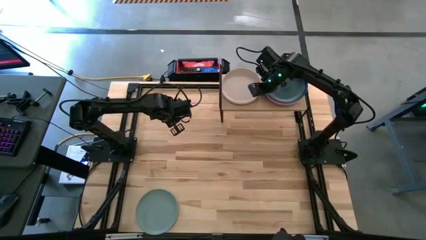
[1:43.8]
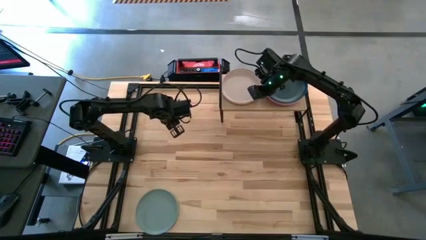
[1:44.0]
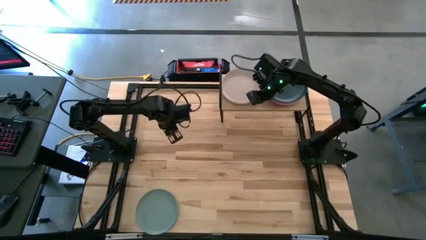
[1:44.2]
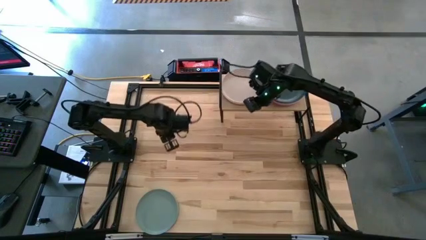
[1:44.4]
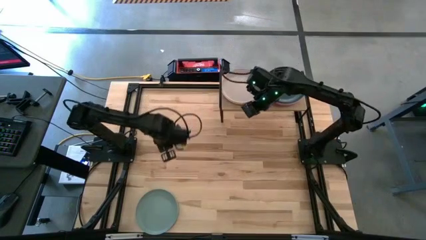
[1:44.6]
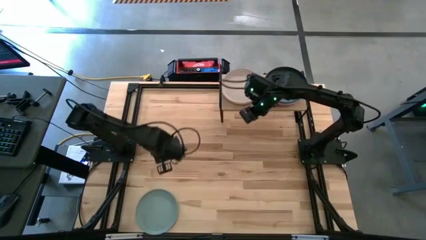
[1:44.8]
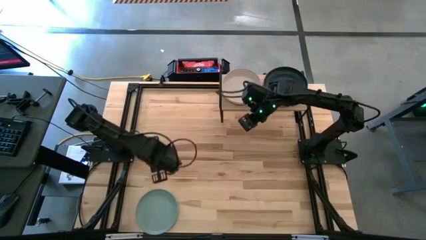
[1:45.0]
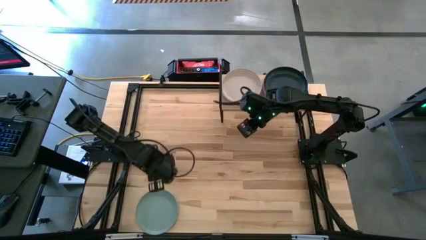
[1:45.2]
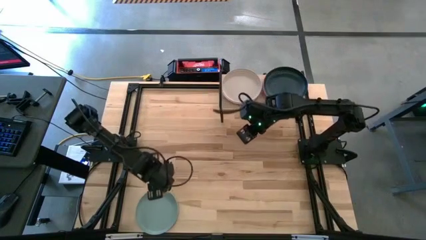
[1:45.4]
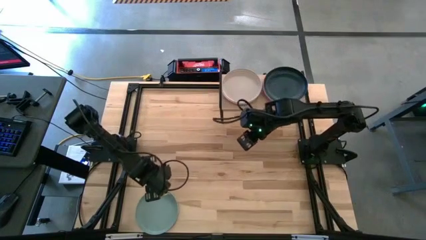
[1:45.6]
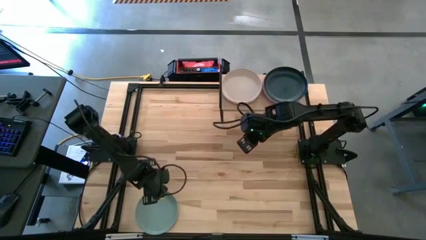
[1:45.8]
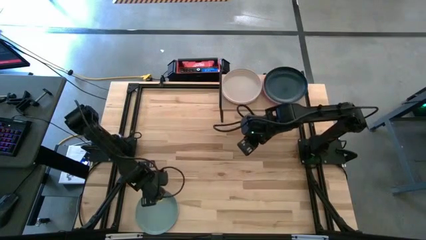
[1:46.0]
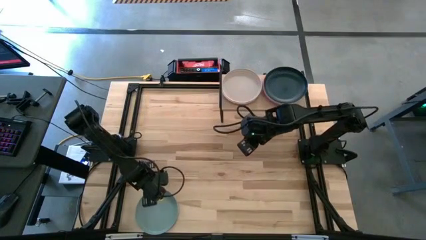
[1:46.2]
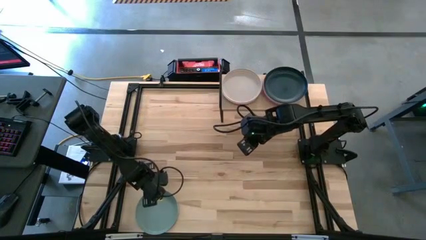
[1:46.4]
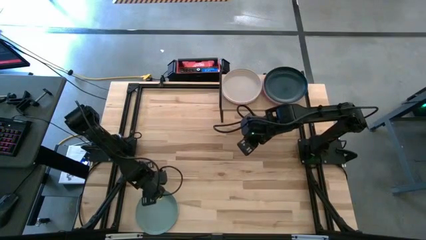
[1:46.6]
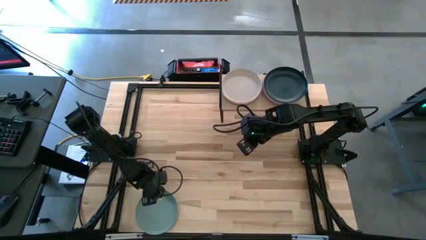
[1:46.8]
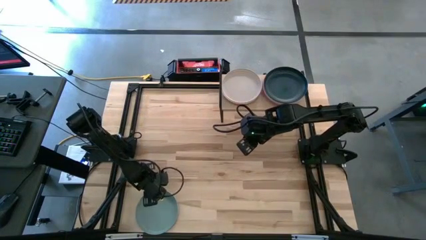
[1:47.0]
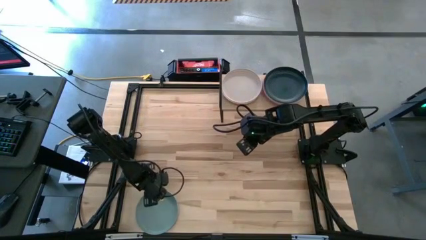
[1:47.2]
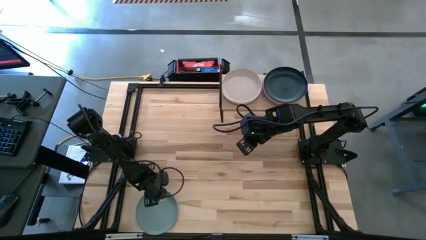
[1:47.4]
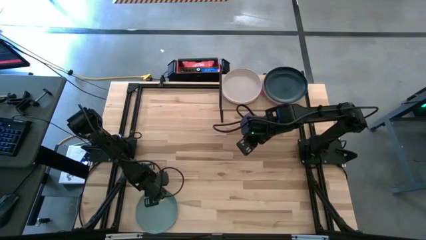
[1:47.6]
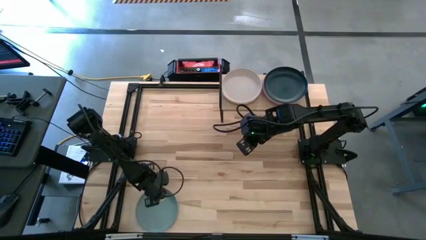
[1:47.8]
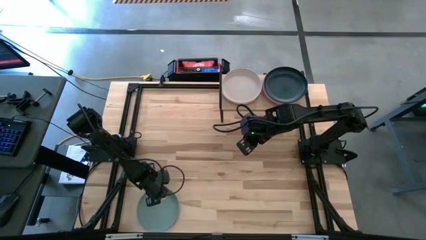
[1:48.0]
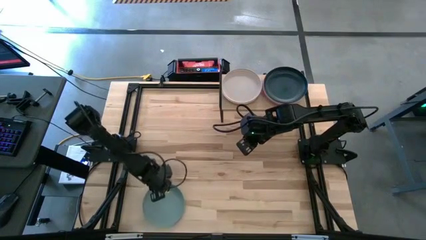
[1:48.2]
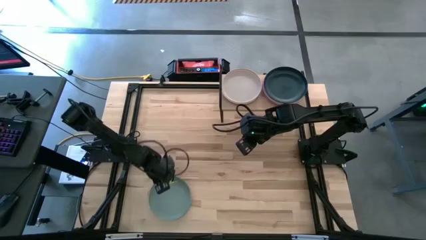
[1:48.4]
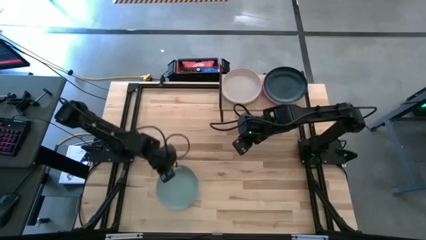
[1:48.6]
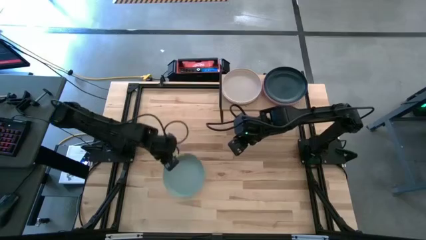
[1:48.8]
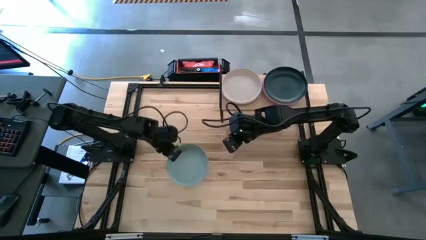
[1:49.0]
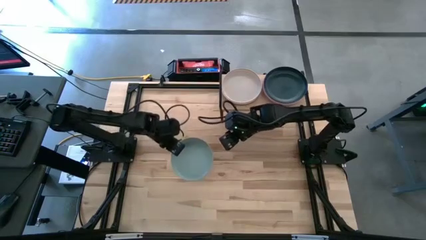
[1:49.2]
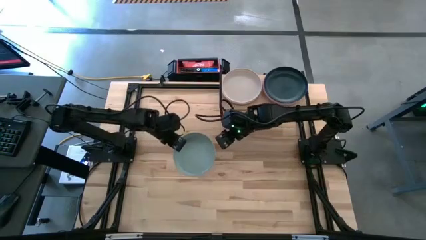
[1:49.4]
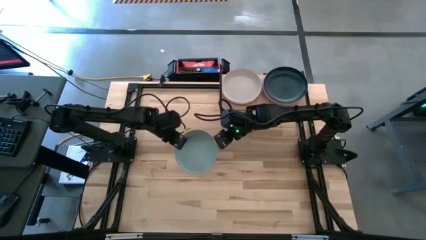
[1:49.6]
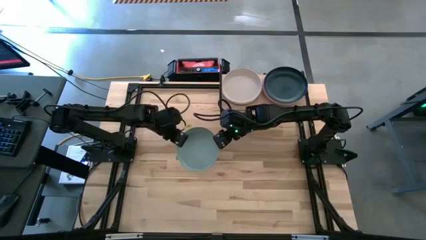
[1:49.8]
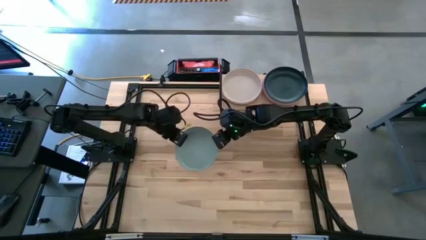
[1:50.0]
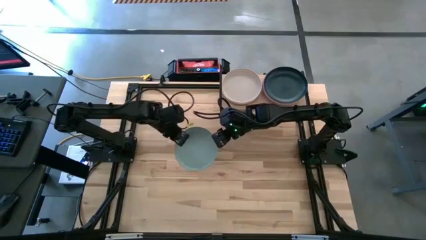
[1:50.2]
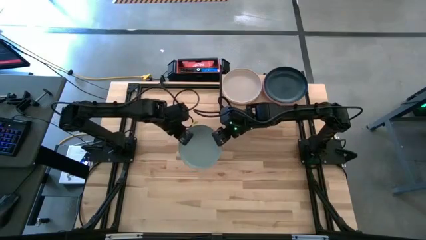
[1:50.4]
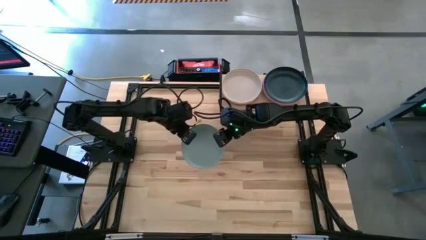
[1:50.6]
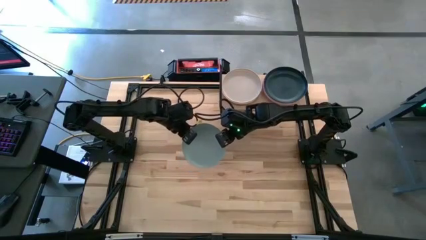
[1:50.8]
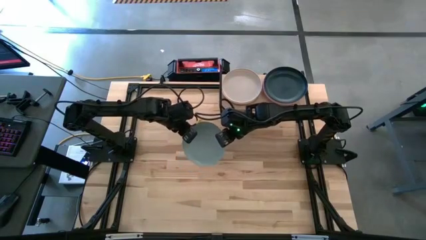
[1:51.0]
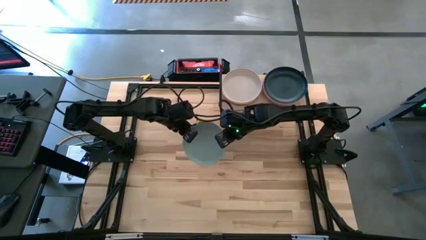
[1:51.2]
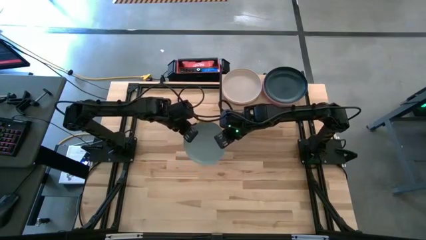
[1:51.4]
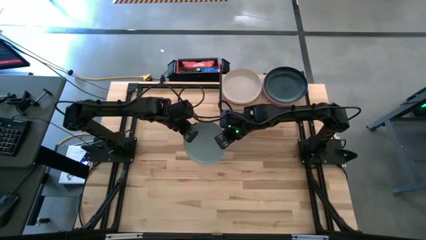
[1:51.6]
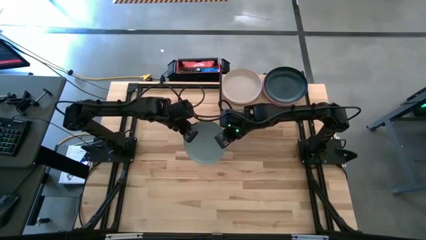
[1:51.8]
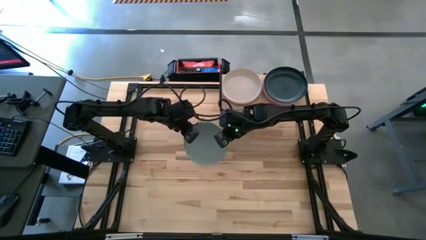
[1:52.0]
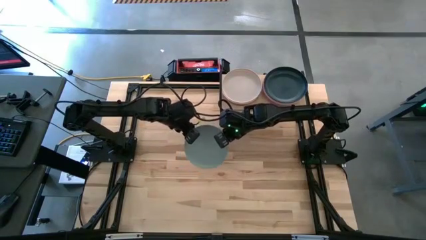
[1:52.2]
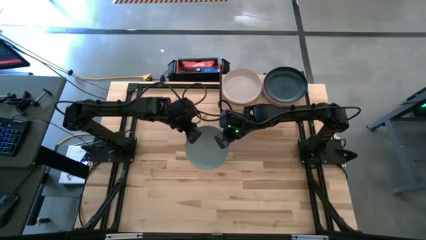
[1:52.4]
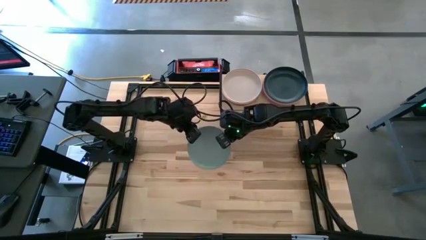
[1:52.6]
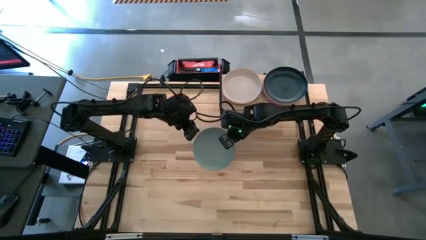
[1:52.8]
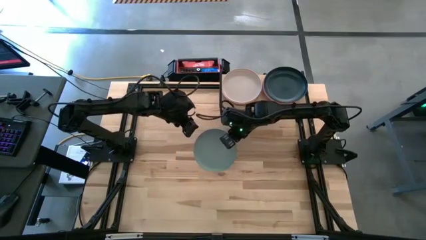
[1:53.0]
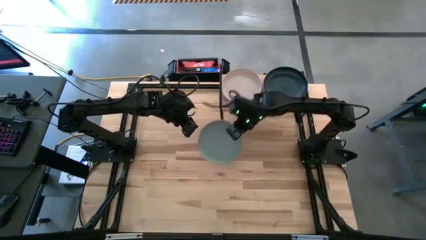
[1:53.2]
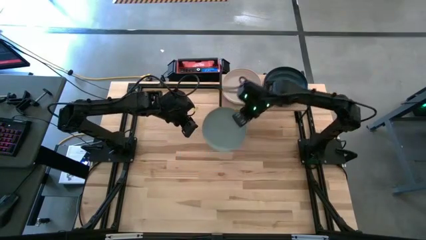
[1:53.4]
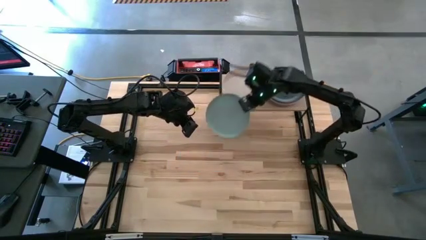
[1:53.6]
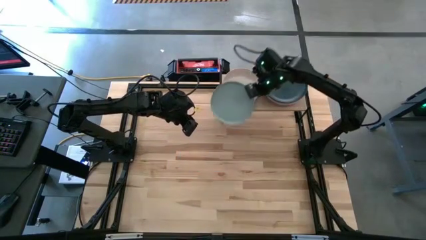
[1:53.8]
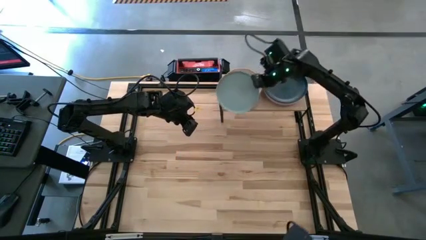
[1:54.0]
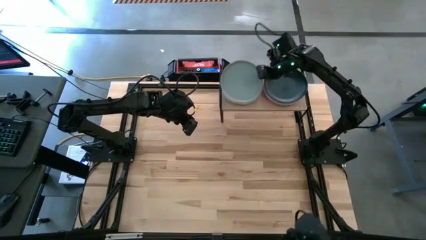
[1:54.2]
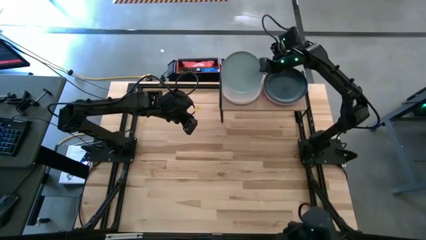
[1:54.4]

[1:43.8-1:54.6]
Task: Place and stack plates onto a shelf
Stack the light blue plate on top of the gray plate on the shelf

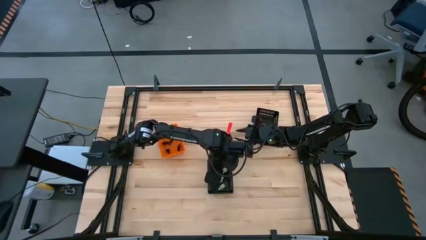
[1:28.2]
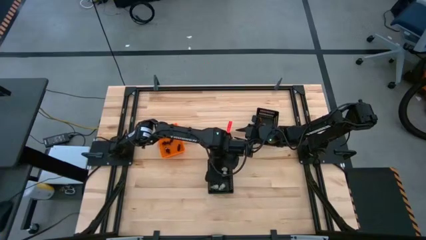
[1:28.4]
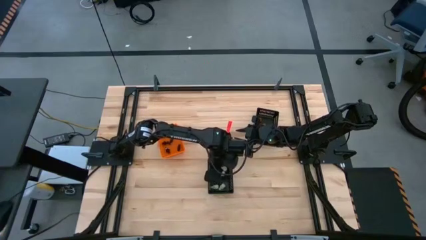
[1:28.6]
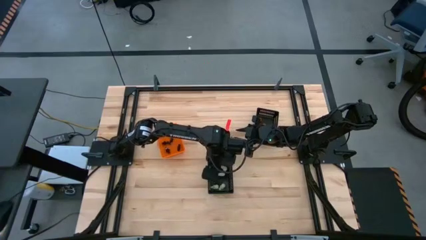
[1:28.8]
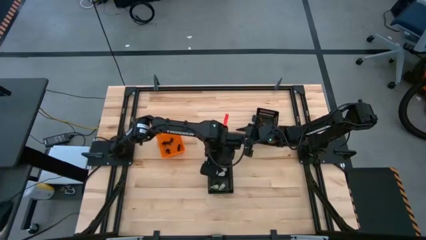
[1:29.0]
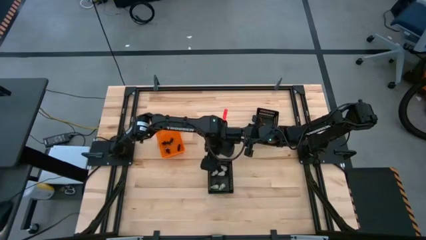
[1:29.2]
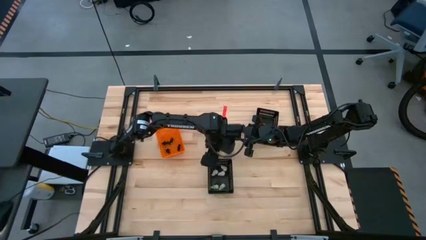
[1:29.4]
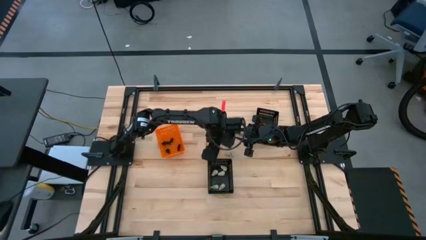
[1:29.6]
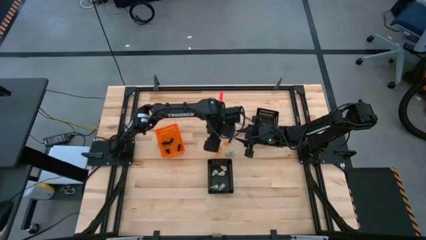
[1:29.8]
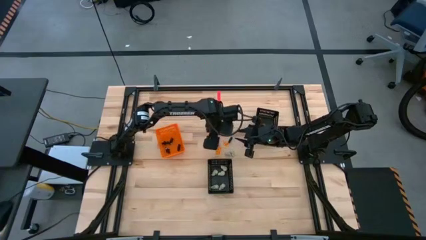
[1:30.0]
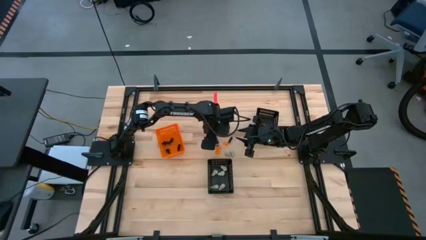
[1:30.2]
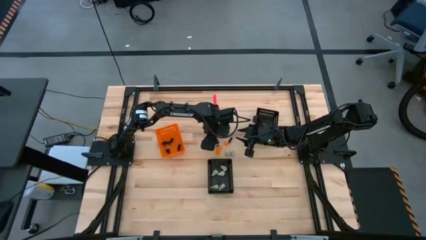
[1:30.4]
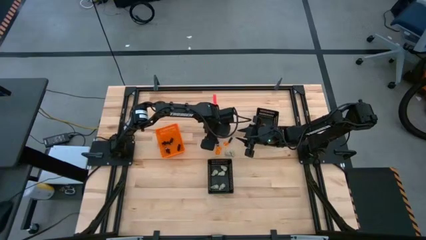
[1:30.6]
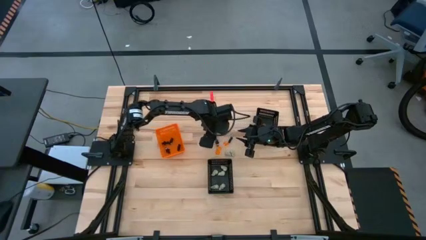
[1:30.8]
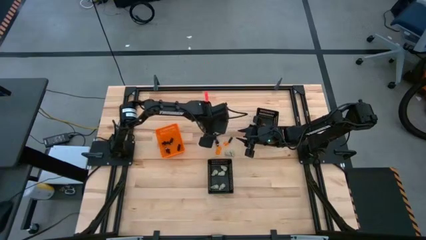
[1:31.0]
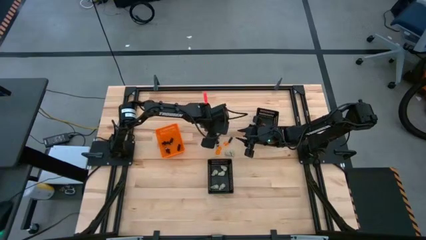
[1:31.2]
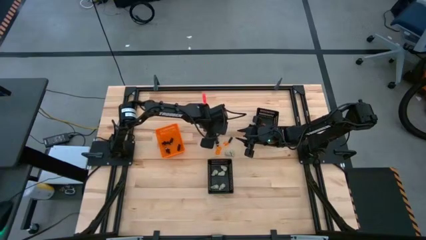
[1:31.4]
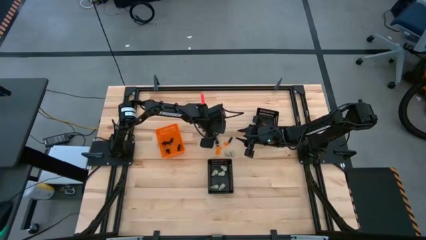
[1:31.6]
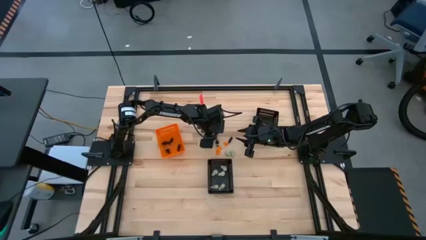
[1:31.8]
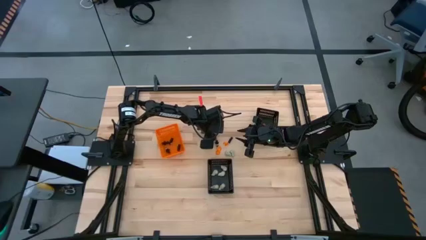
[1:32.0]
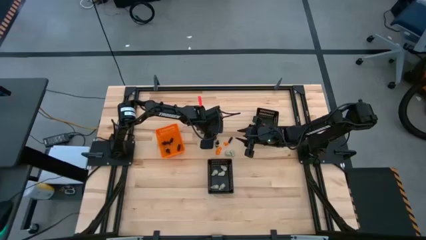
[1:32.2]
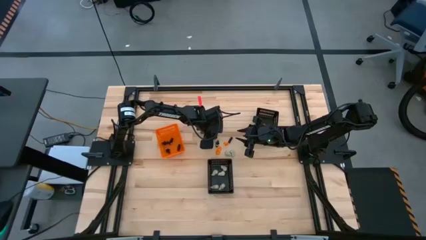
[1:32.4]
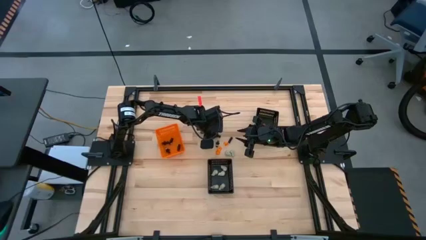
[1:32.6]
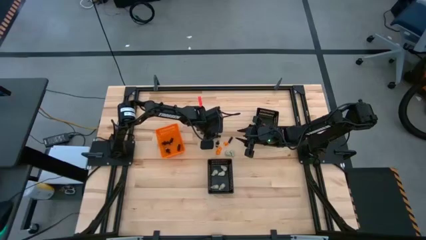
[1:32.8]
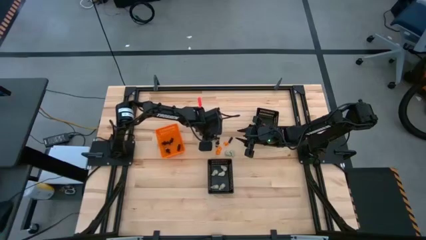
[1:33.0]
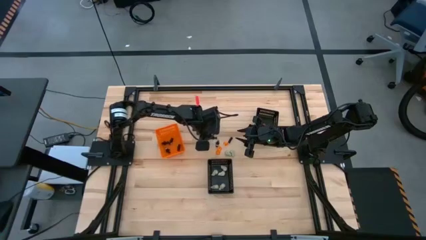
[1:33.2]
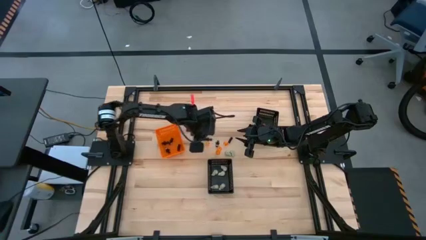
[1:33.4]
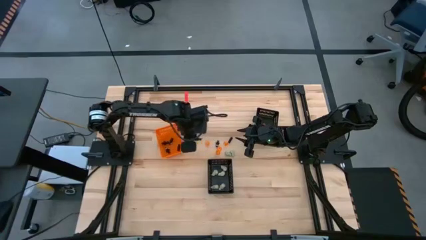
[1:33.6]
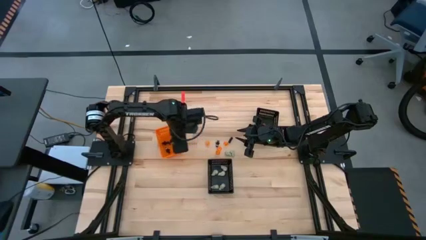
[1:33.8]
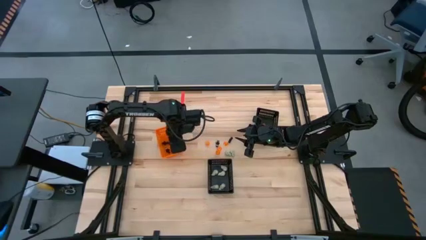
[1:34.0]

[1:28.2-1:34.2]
Task: Sort Halloween decoration
Put the black skeleton toy into the orange bin

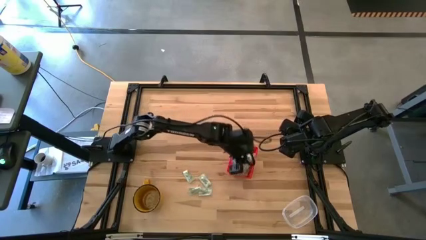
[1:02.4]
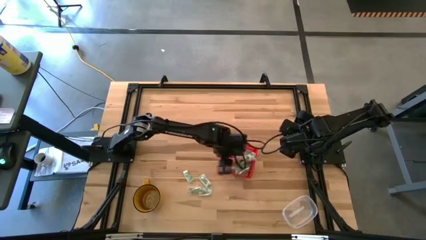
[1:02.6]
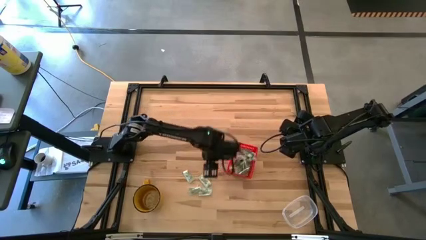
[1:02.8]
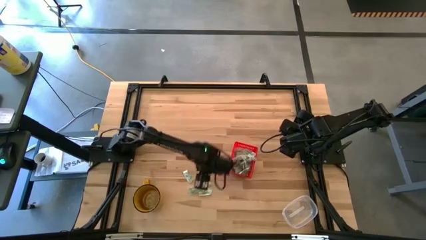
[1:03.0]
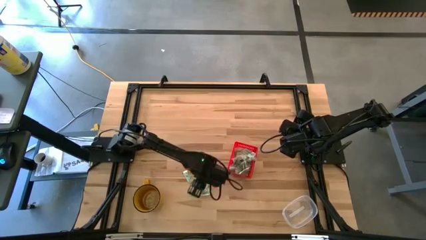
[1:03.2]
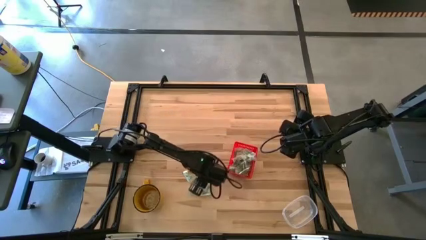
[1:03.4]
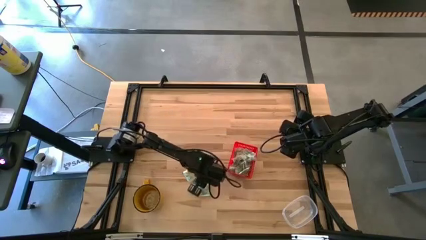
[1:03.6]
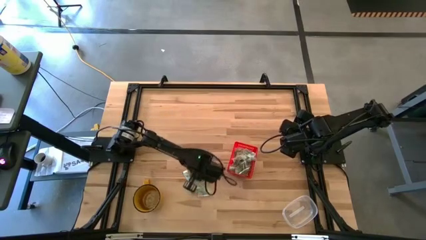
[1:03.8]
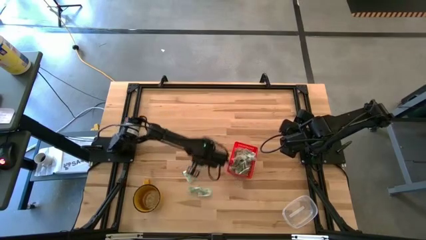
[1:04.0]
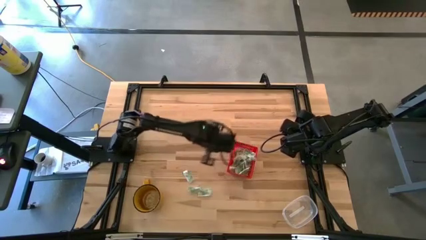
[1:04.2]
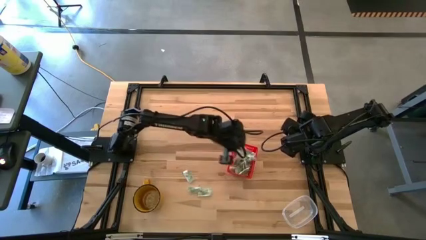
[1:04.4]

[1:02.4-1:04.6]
Task: Pick and place items into bin
Put the light green stevia packet into the red bin
